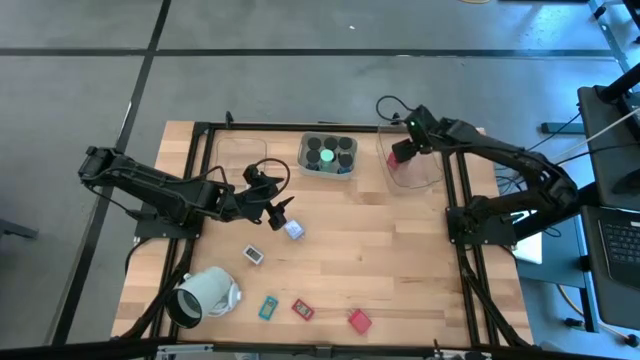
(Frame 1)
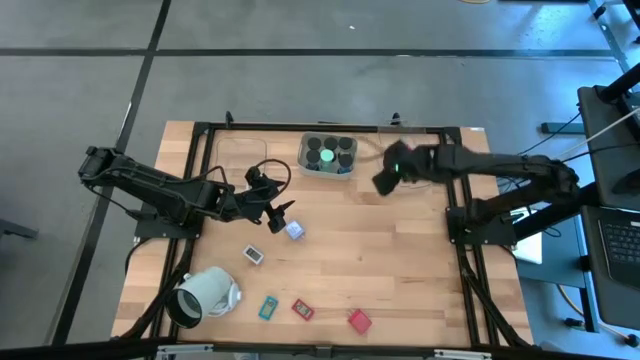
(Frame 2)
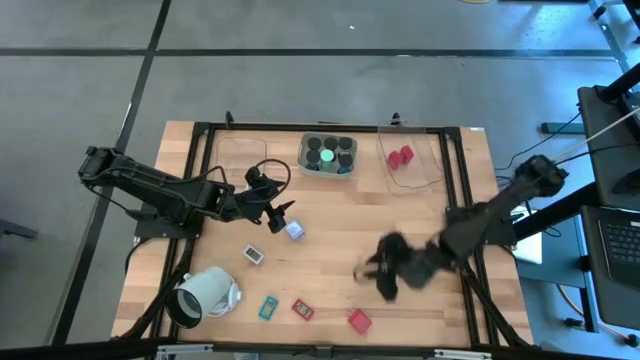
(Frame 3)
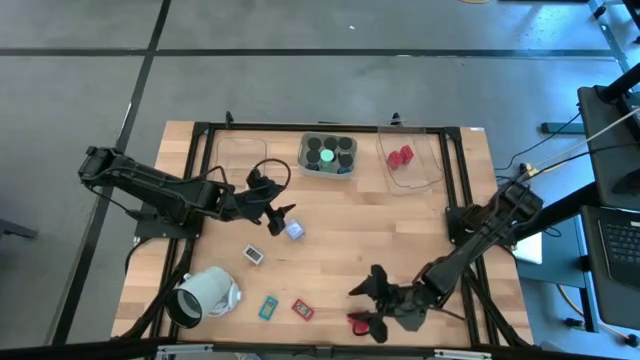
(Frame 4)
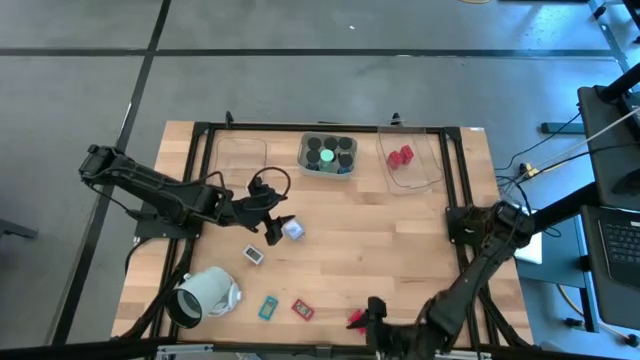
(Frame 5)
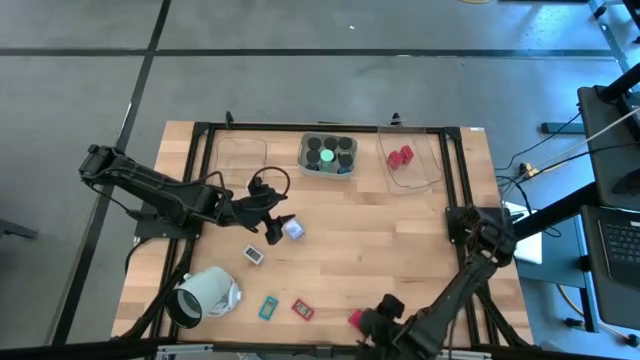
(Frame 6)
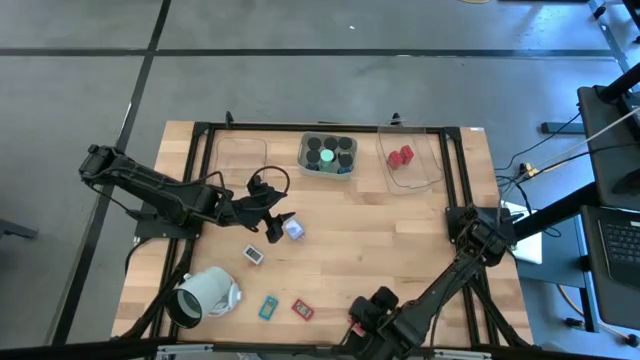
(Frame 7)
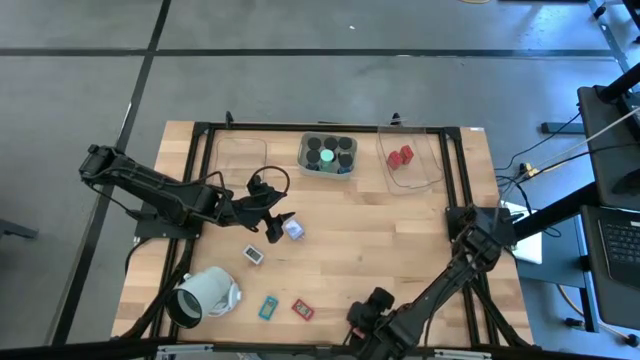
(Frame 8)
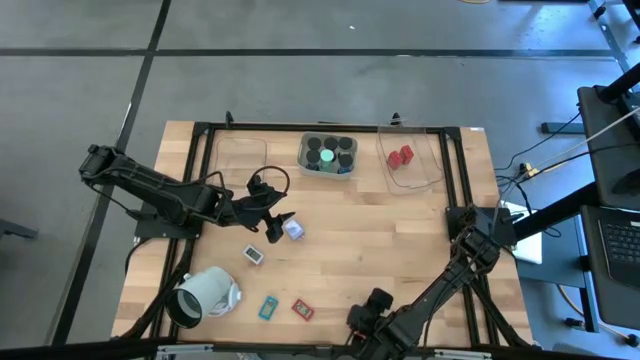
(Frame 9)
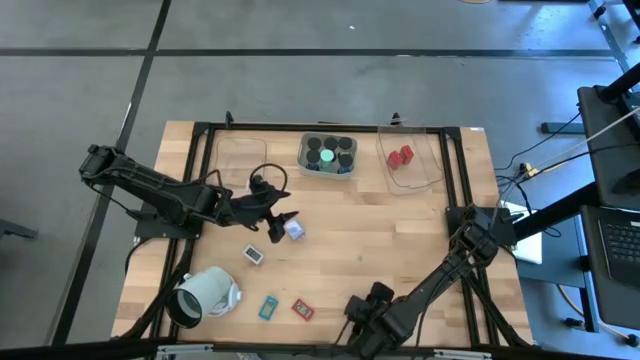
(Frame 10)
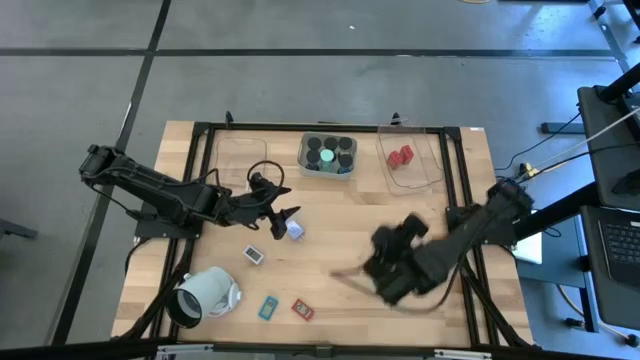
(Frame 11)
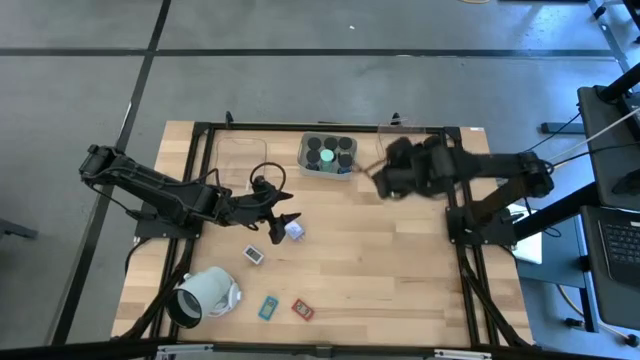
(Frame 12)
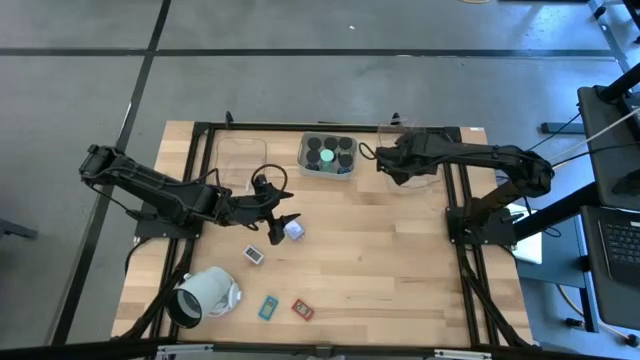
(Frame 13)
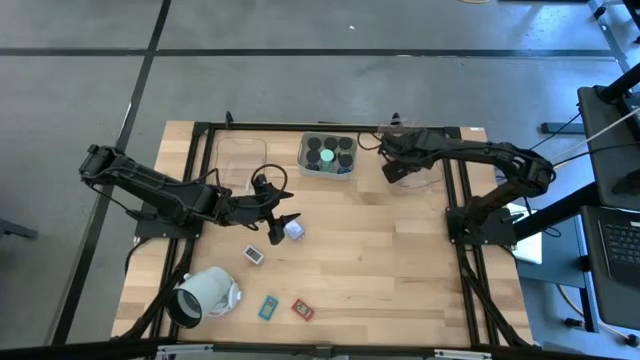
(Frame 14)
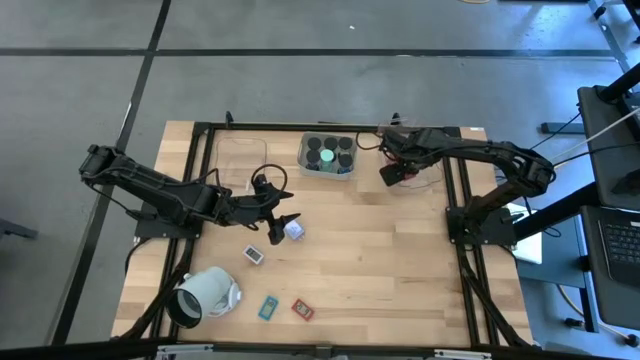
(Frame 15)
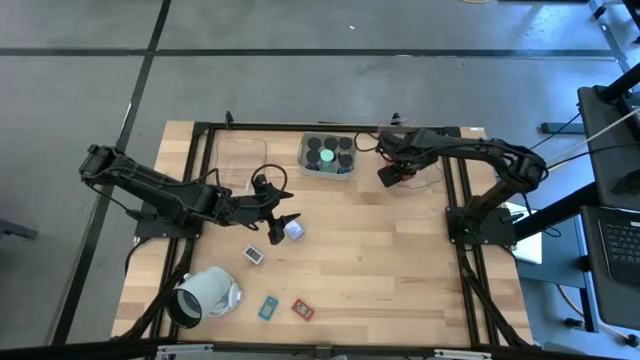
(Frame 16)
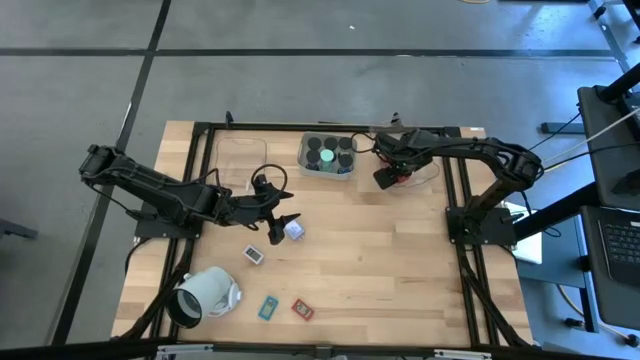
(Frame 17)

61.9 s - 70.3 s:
Task: Pick & Place Office items
Put the red charger adapter into the right transparent bin

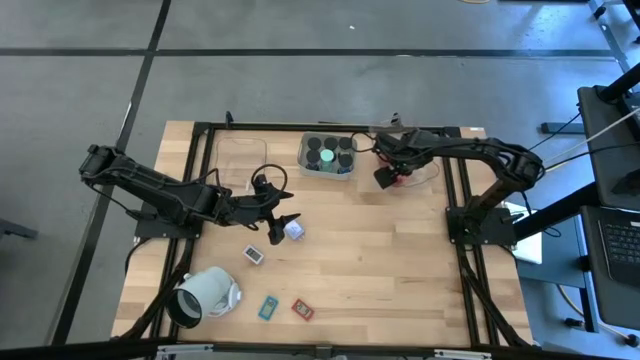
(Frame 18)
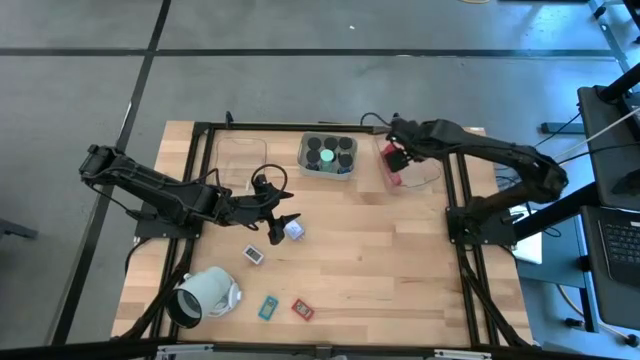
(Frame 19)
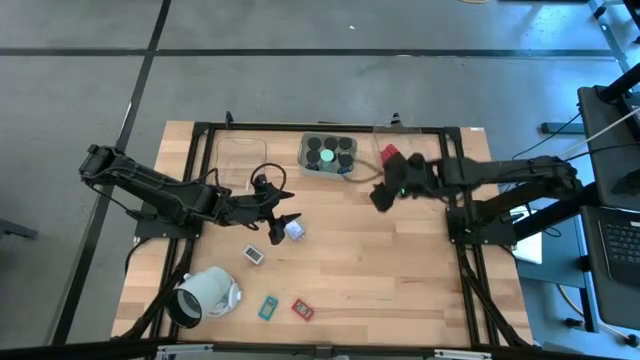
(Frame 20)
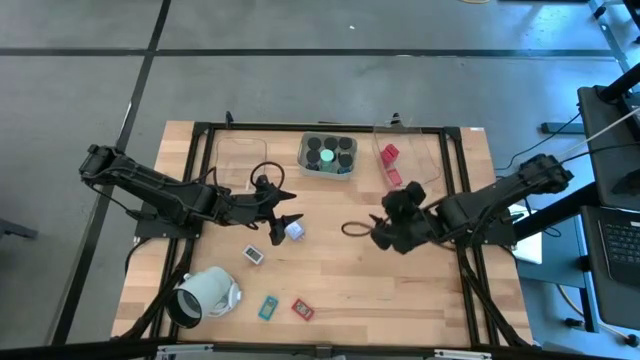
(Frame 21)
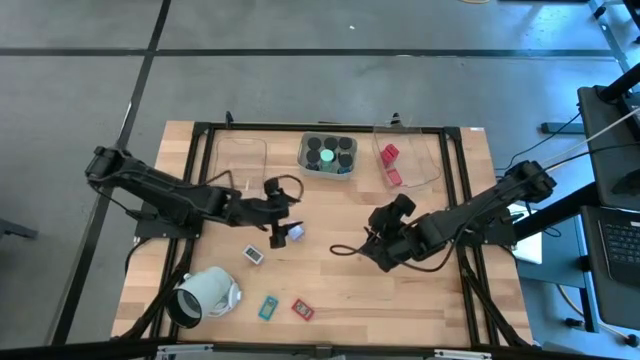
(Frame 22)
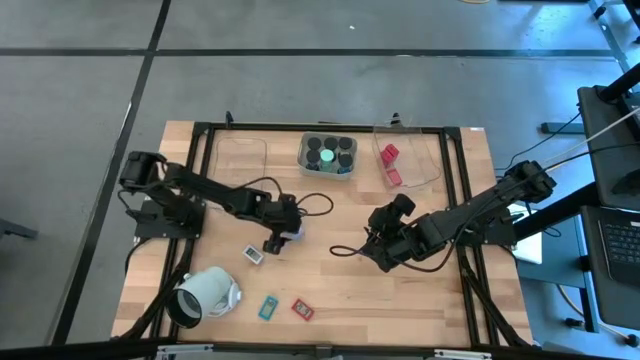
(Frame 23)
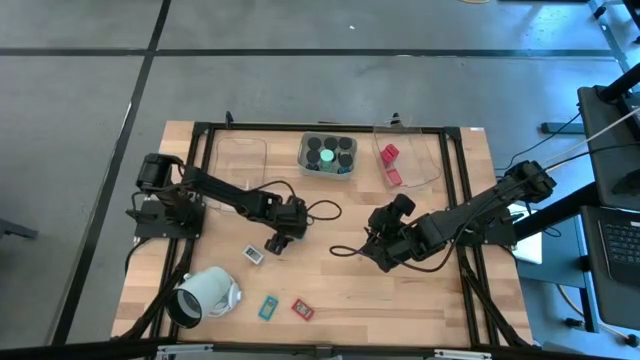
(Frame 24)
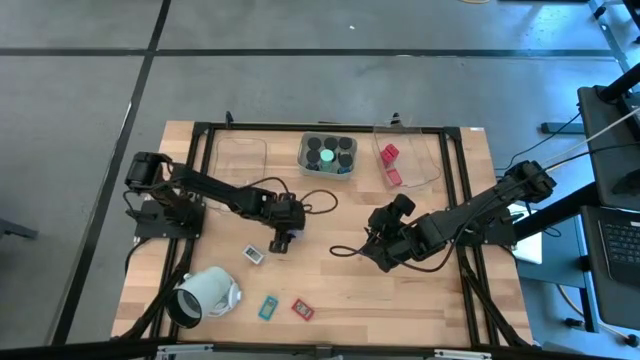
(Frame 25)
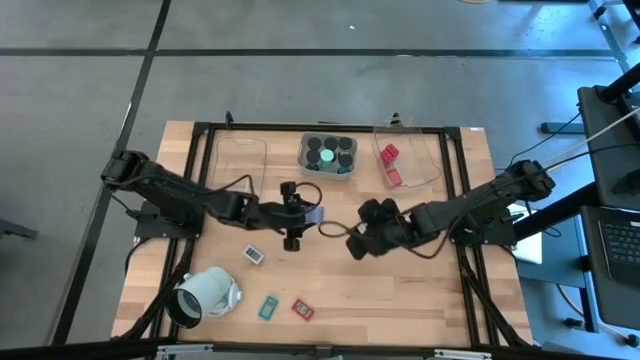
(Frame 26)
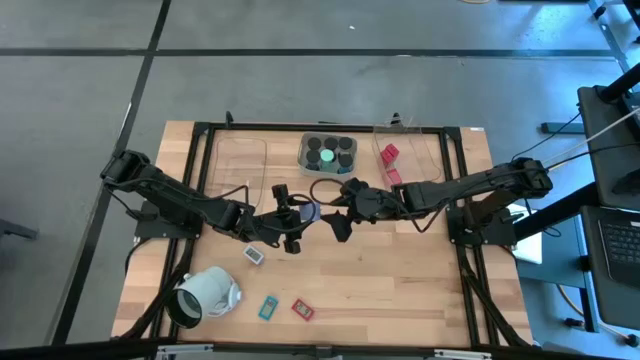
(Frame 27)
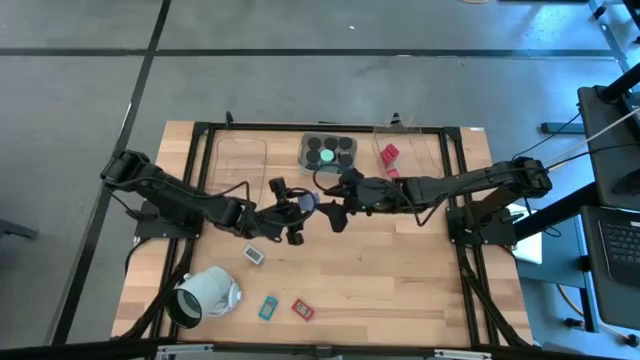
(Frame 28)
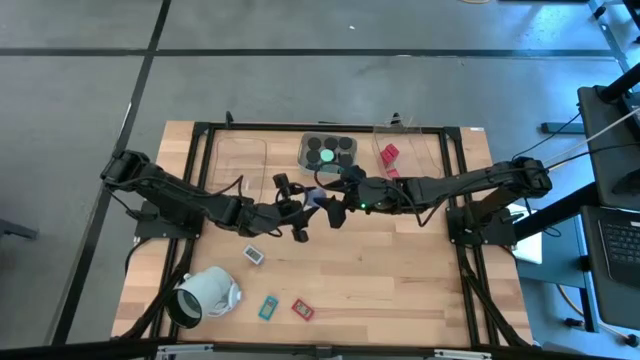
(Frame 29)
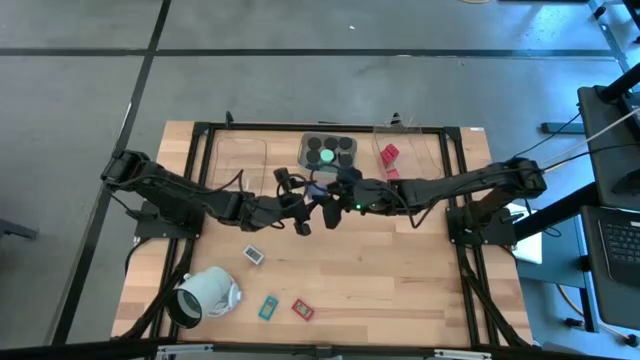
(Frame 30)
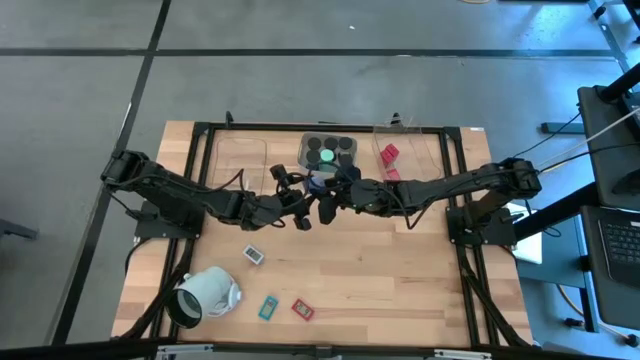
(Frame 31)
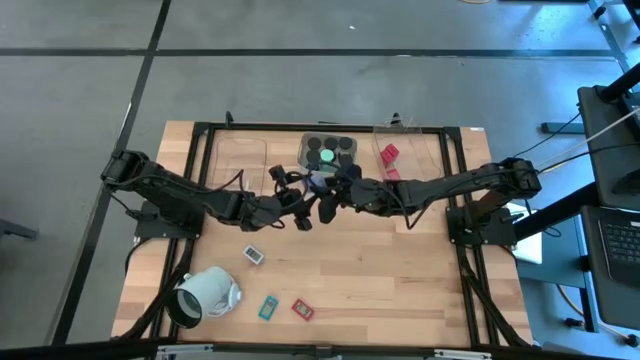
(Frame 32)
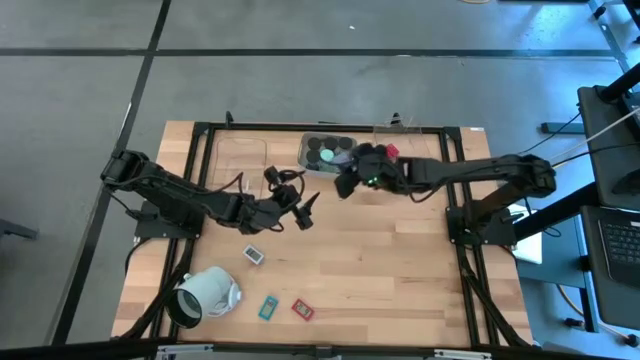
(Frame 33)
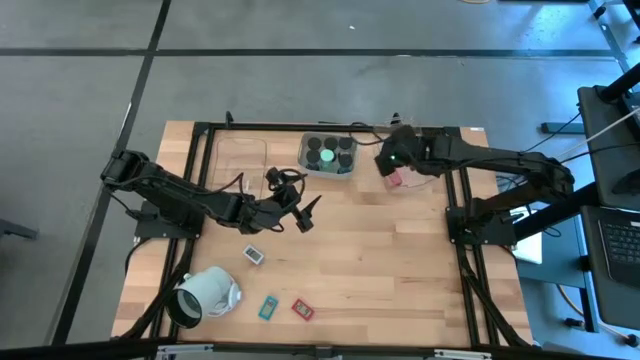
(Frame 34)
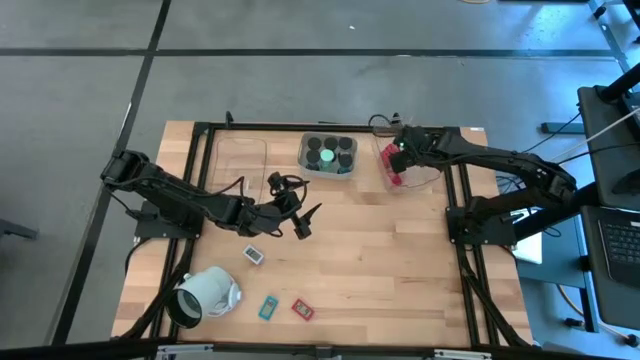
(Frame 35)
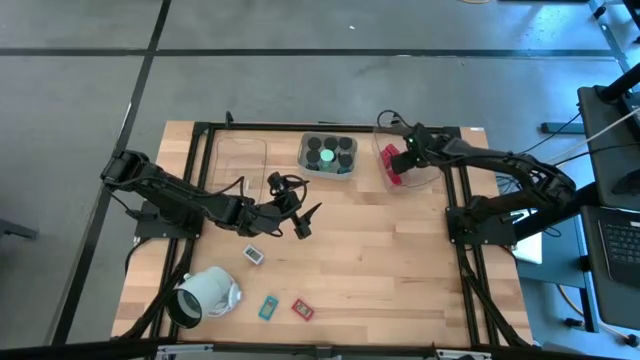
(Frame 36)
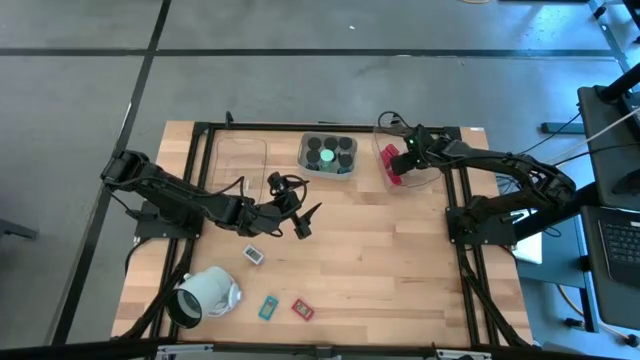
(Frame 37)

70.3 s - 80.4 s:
Put the blue charger adapter into the right transparent bin

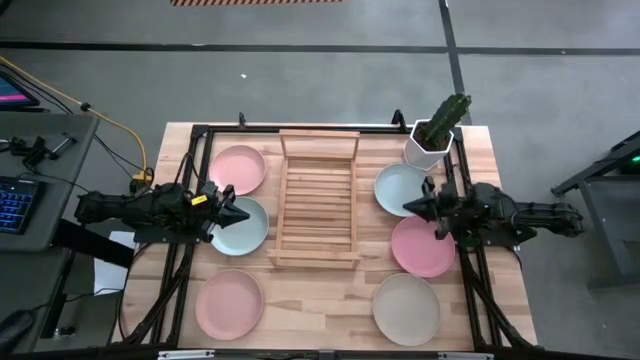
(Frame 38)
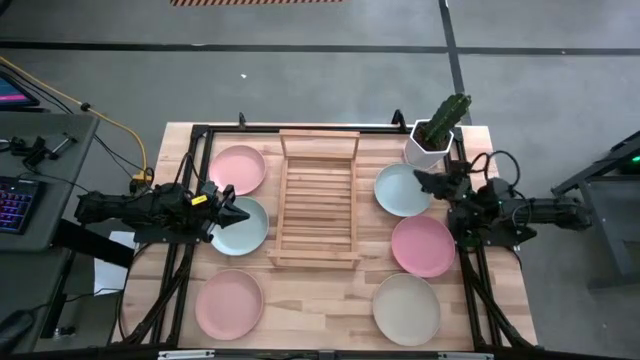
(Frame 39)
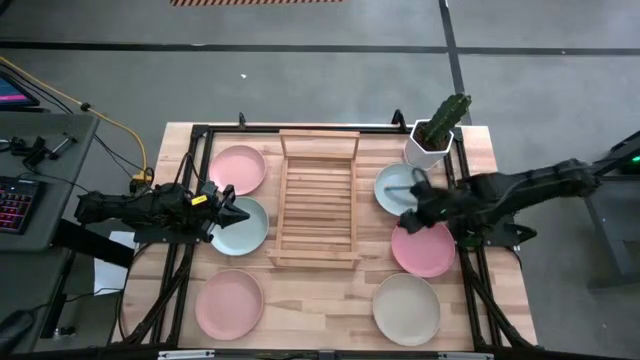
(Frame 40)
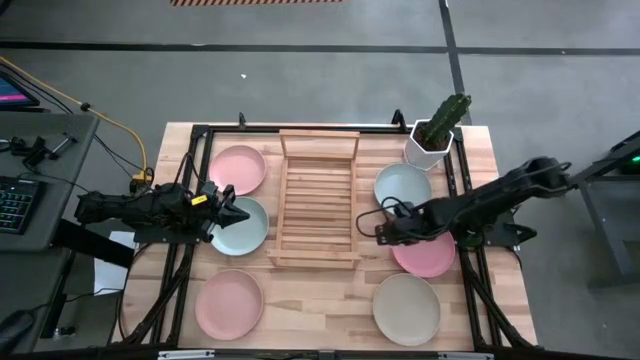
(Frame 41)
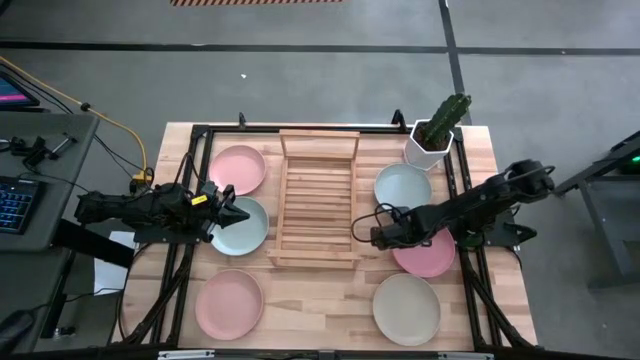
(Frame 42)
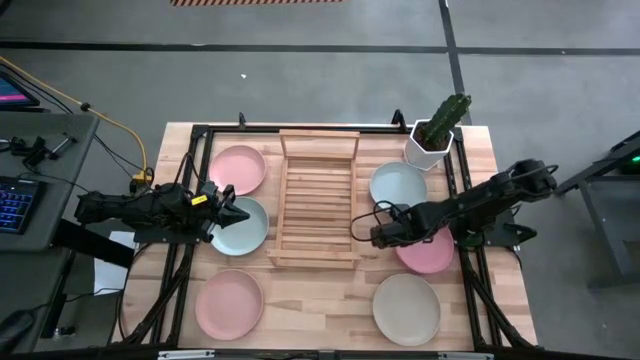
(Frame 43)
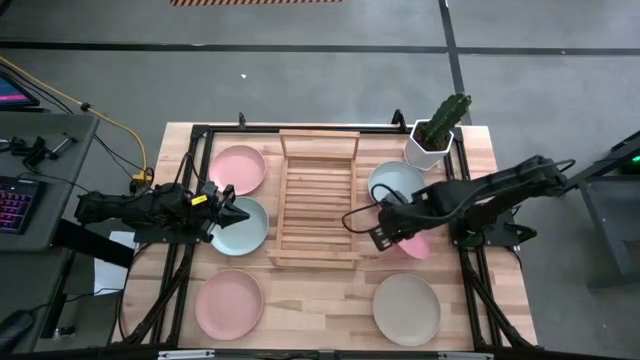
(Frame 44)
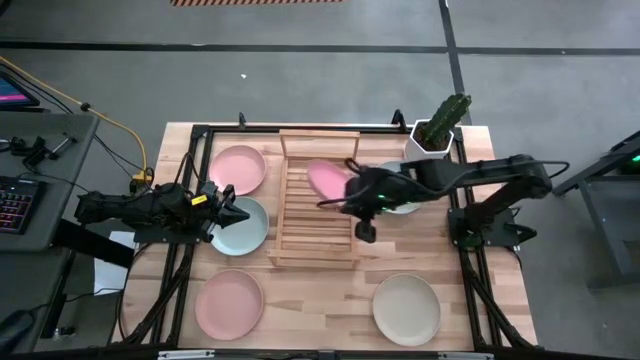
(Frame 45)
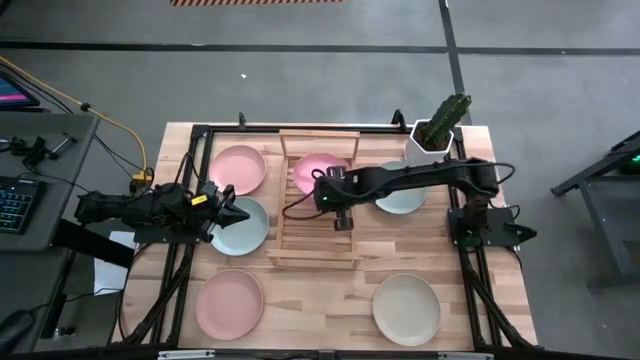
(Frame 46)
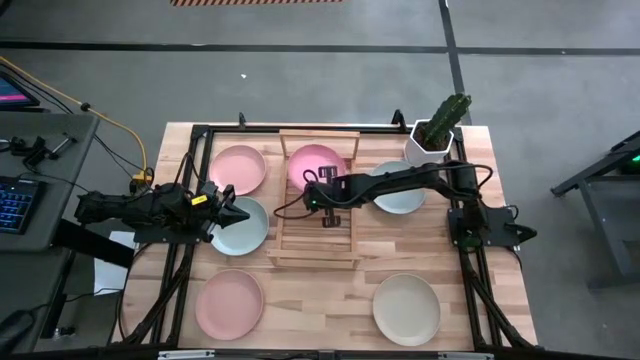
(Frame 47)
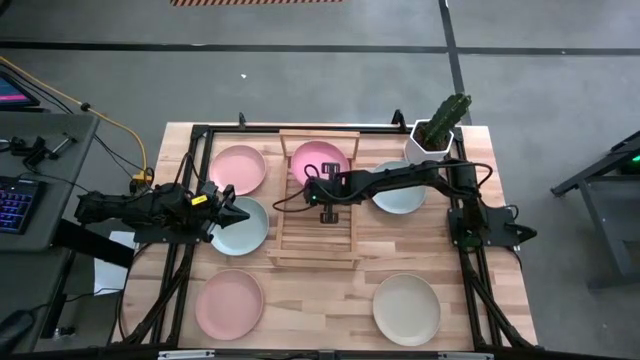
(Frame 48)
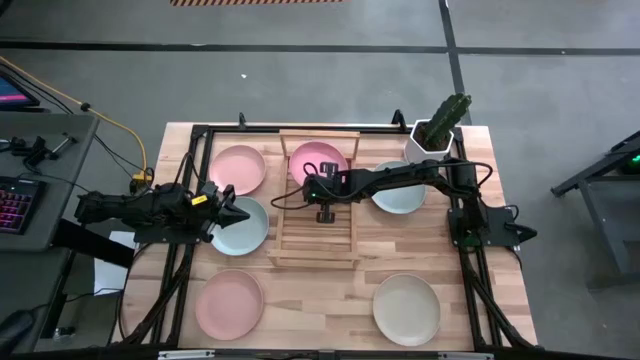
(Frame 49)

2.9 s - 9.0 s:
Task: Place and stack plates onto a shelf
Put the pink plate on the shelf
